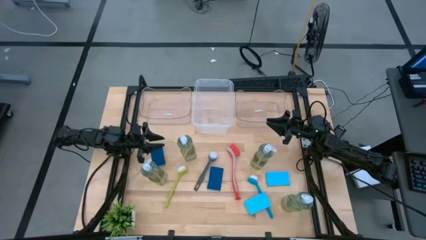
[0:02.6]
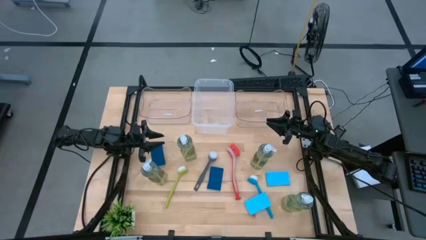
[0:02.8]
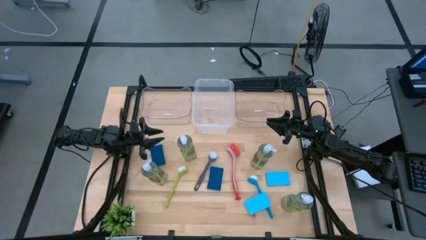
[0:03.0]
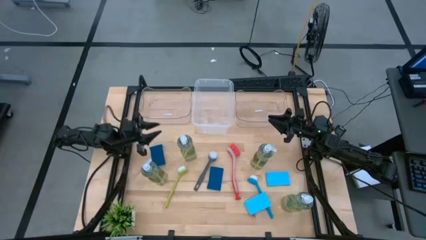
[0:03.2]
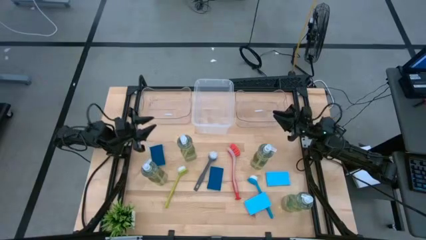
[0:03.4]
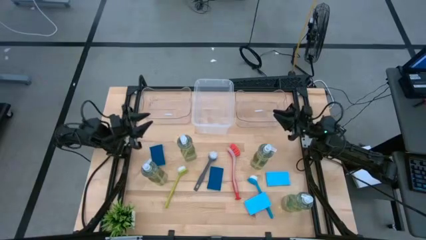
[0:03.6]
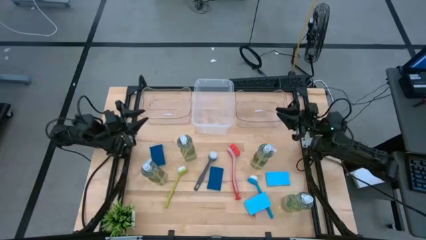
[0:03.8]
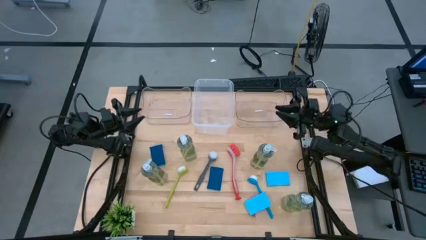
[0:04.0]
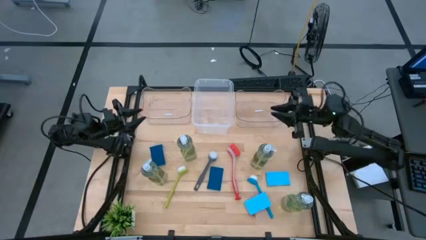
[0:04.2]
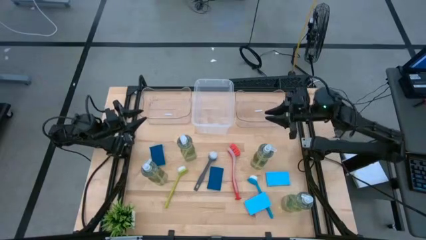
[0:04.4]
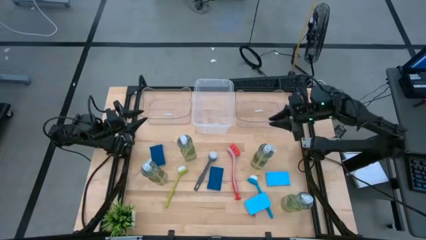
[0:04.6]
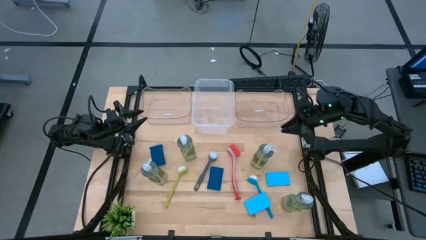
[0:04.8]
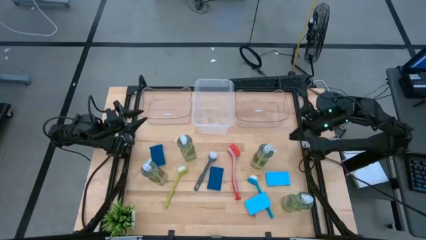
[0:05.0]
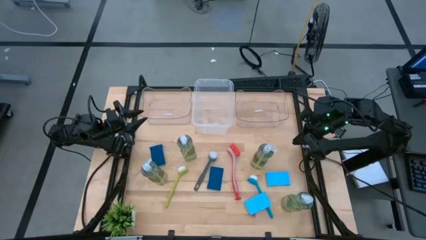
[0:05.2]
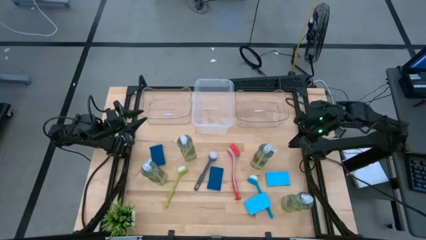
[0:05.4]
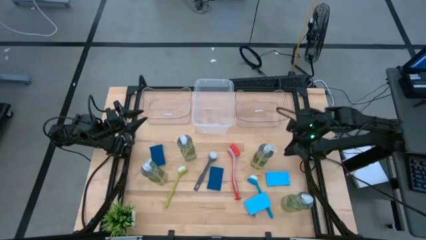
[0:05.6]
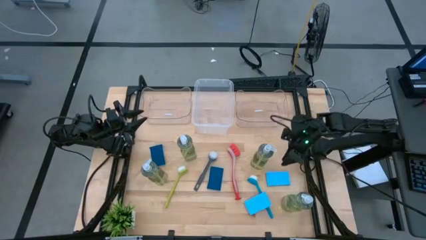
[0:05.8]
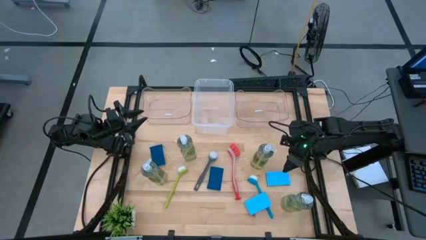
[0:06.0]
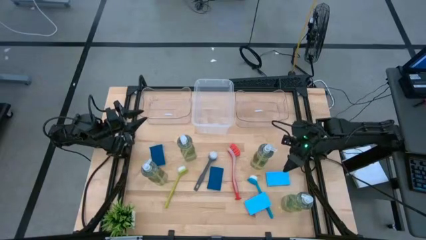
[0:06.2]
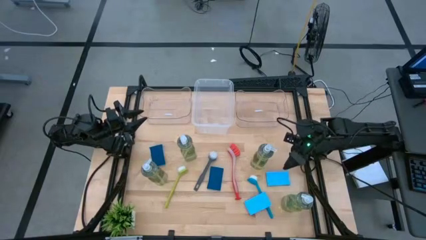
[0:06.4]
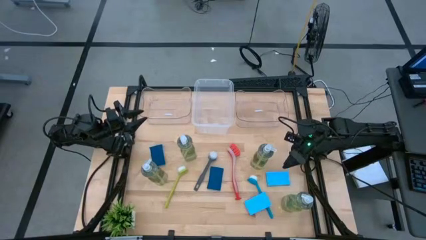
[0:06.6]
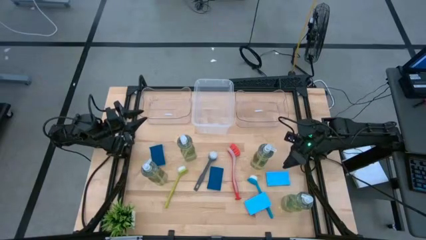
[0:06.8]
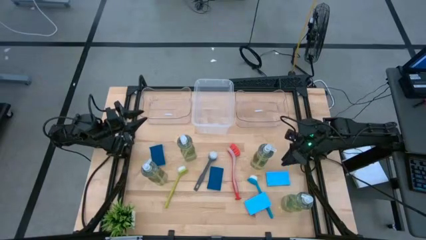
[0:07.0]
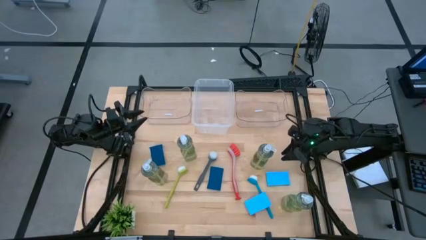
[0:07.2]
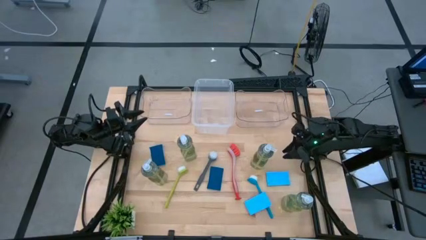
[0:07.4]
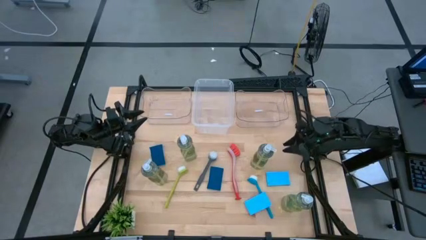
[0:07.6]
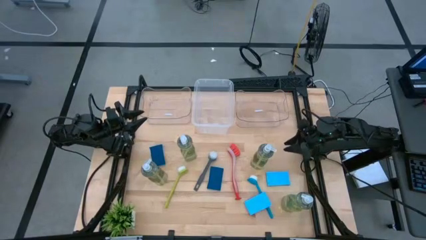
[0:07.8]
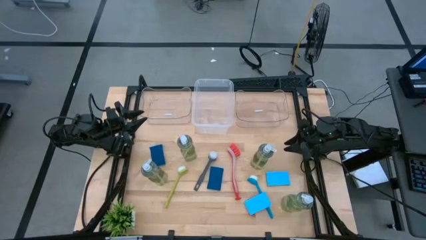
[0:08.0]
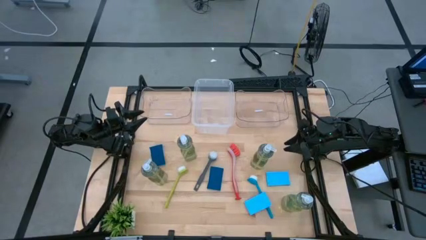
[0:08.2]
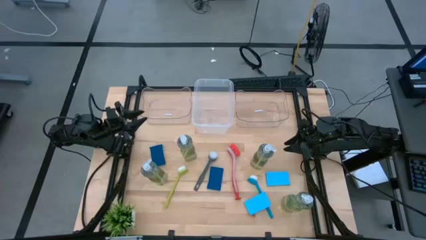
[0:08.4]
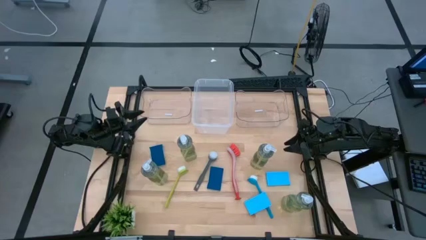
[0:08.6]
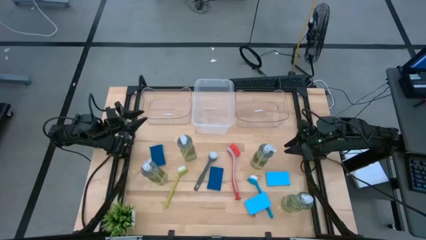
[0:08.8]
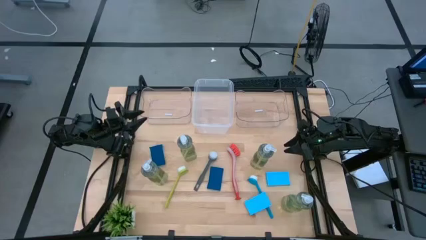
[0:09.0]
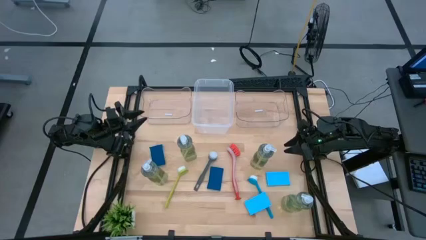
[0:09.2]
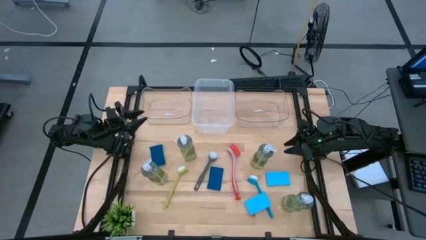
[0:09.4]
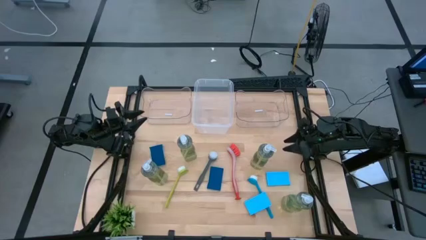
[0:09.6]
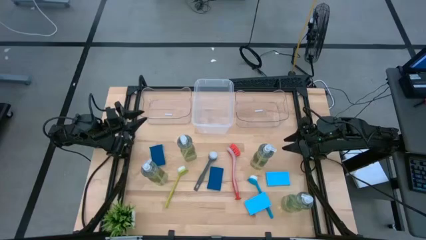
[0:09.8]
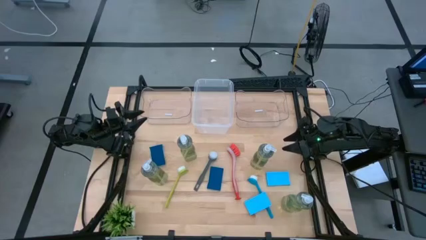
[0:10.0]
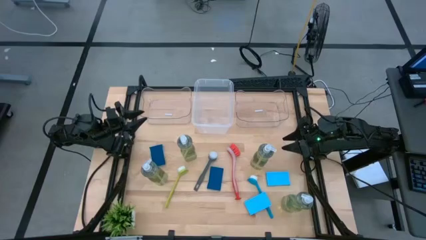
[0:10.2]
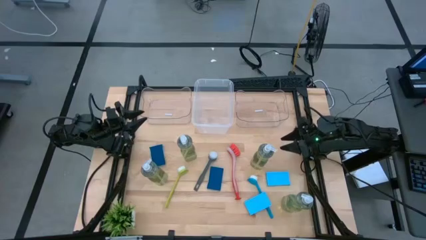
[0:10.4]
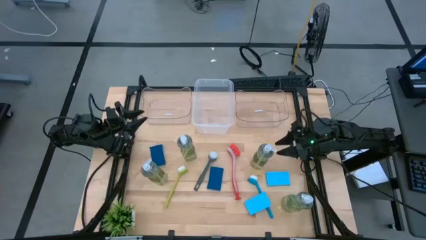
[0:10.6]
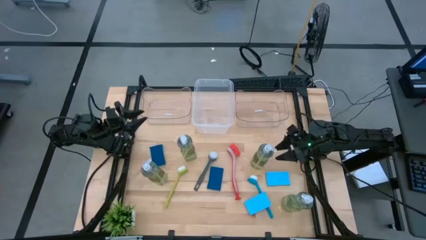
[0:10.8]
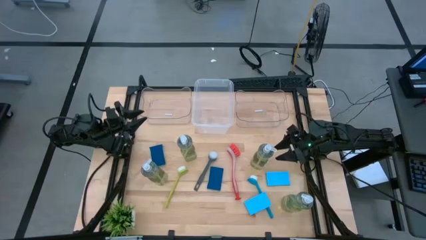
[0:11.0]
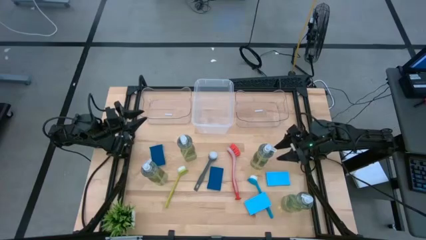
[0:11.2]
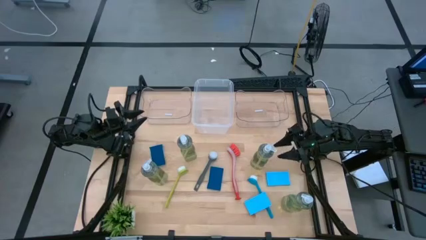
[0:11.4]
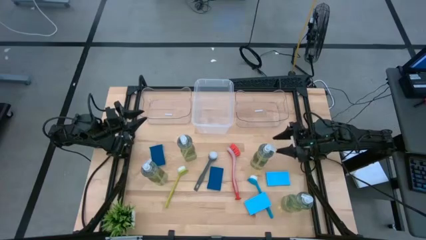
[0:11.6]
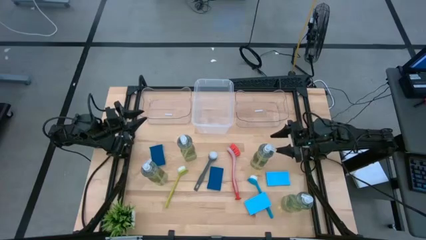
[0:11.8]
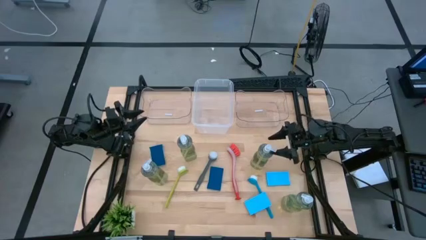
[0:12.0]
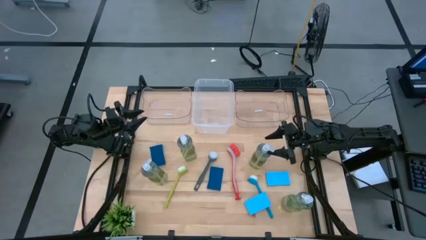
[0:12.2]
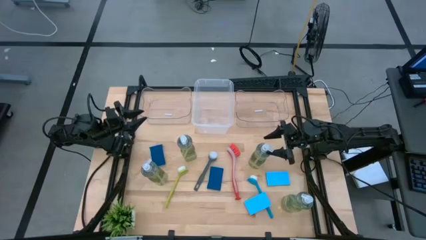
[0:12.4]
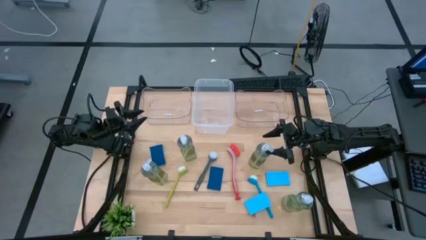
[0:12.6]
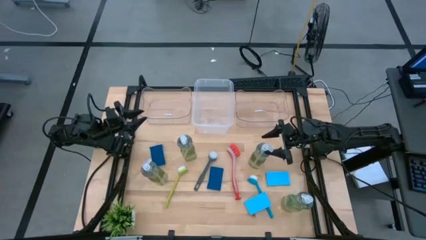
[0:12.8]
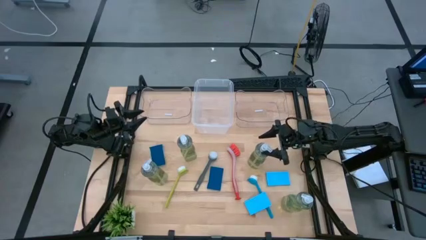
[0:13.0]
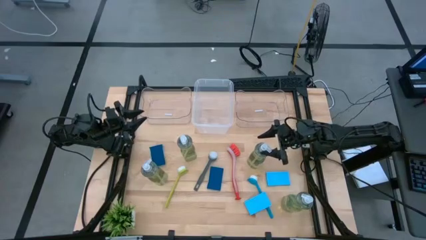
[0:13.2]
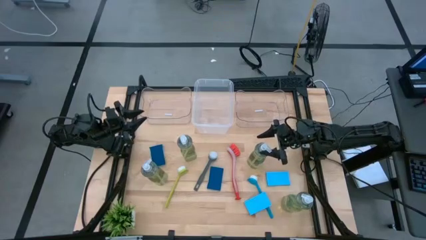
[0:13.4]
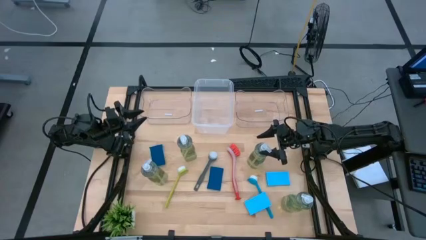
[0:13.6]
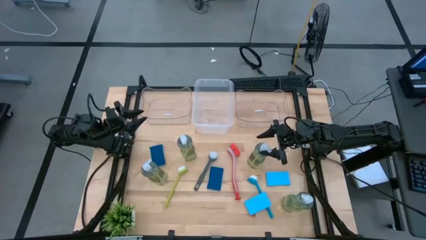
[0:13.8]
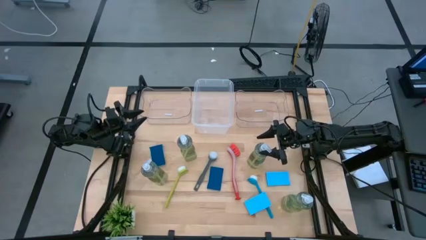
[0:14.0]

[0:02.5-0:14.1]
Task: Pick & Place Kitchen Sink Supplies
Put the green soap dispenser into the white transparent bin
